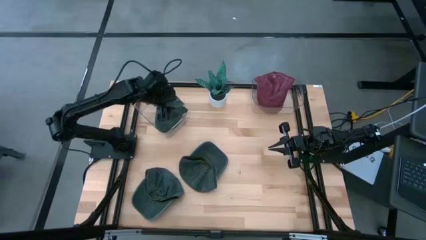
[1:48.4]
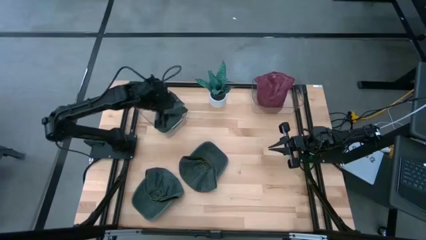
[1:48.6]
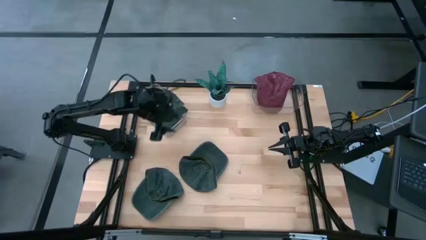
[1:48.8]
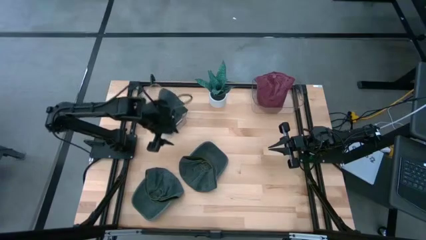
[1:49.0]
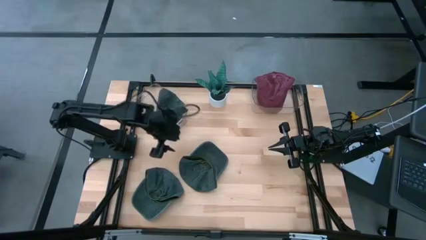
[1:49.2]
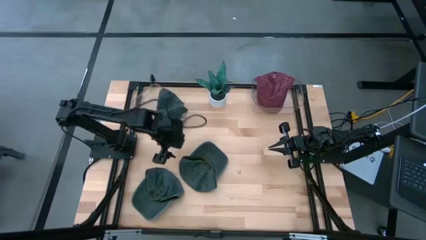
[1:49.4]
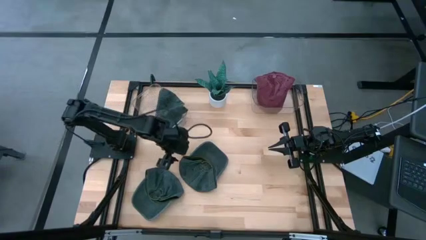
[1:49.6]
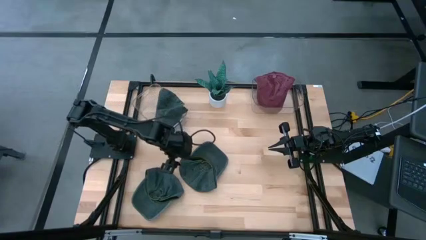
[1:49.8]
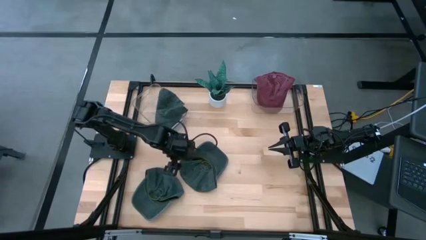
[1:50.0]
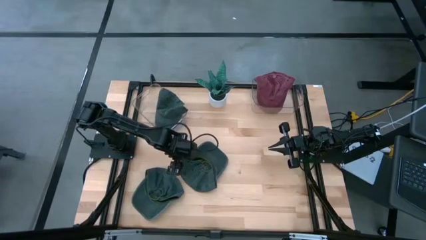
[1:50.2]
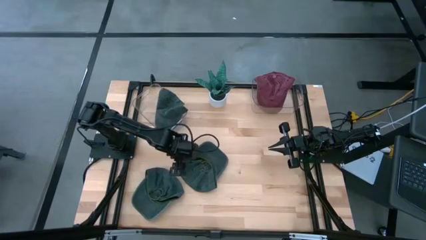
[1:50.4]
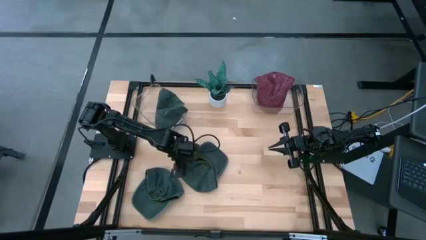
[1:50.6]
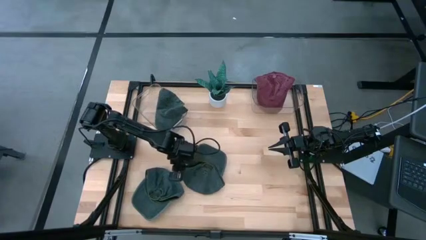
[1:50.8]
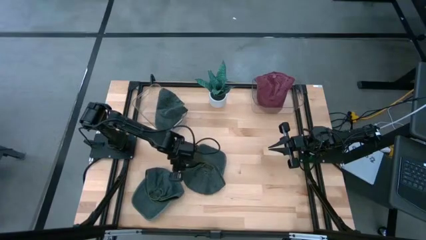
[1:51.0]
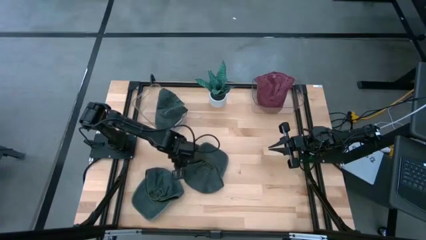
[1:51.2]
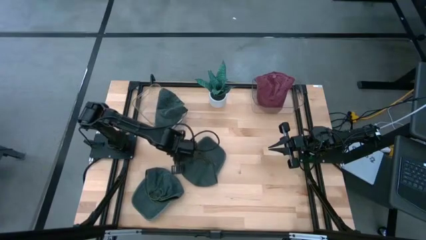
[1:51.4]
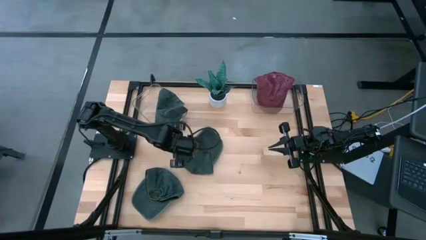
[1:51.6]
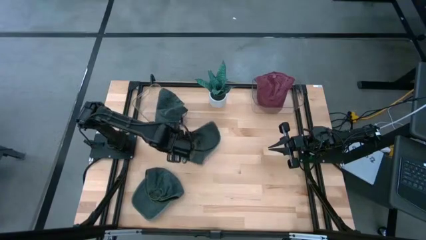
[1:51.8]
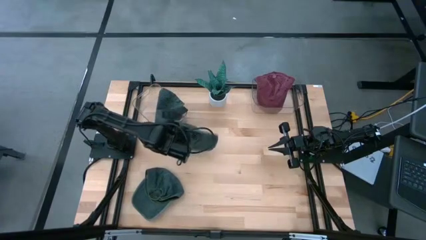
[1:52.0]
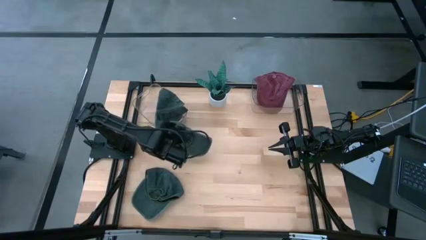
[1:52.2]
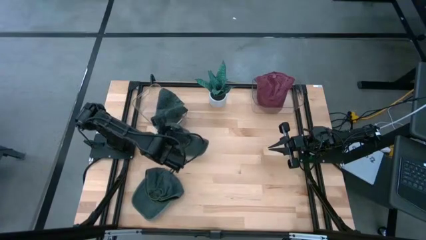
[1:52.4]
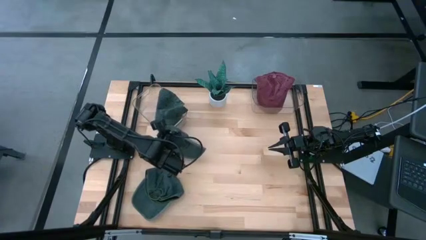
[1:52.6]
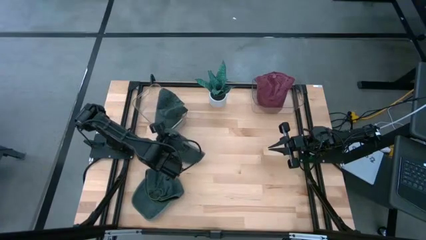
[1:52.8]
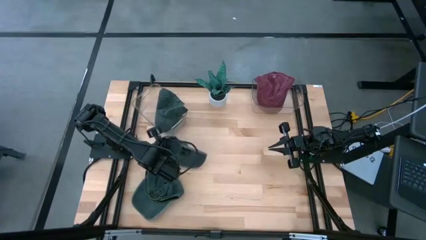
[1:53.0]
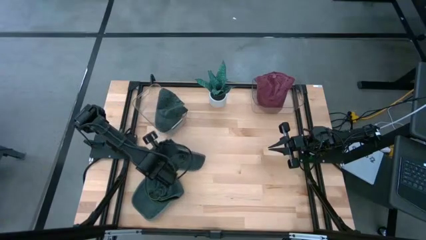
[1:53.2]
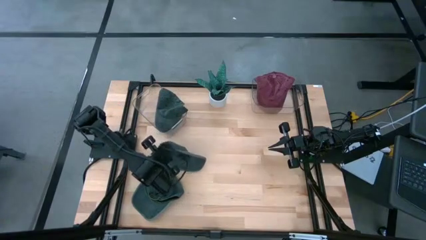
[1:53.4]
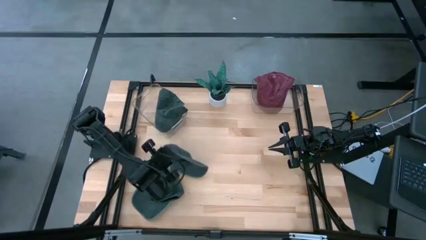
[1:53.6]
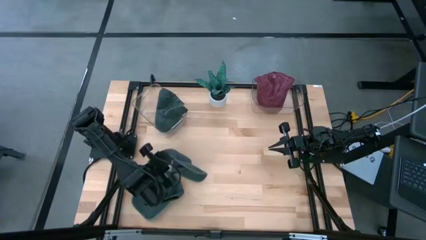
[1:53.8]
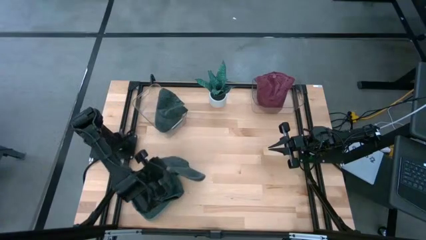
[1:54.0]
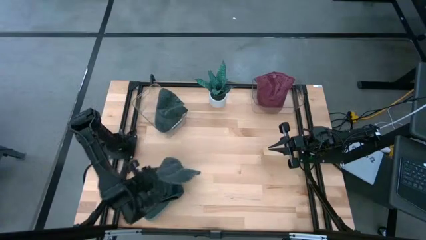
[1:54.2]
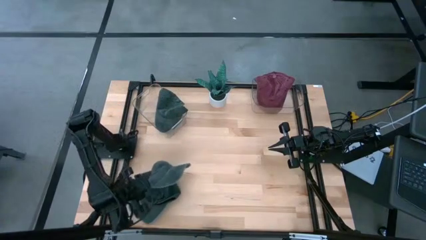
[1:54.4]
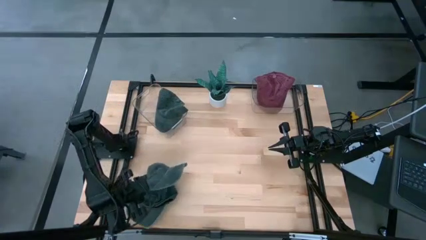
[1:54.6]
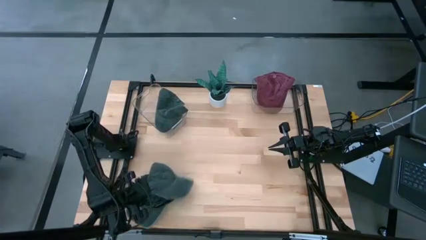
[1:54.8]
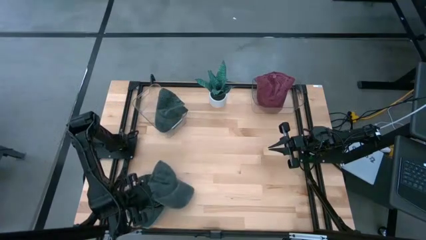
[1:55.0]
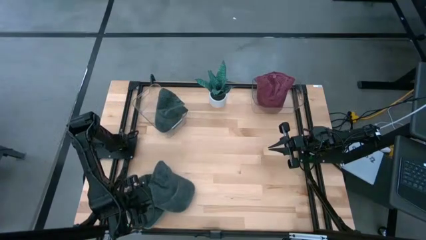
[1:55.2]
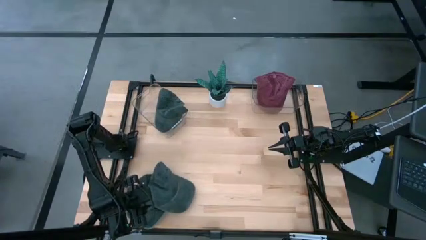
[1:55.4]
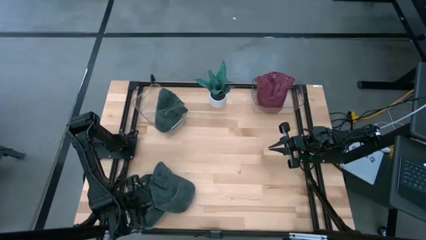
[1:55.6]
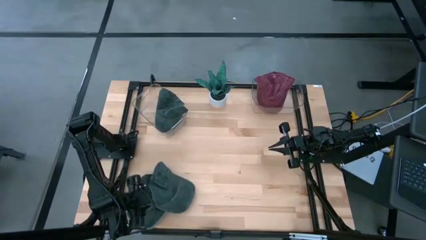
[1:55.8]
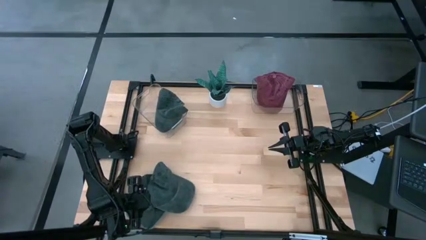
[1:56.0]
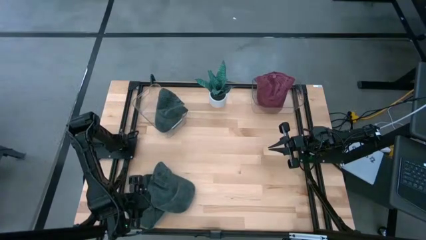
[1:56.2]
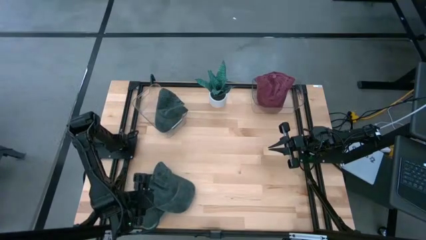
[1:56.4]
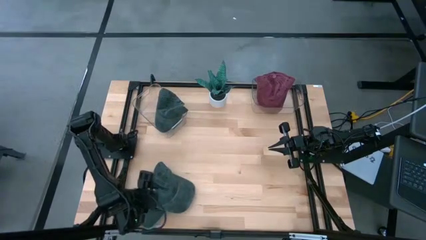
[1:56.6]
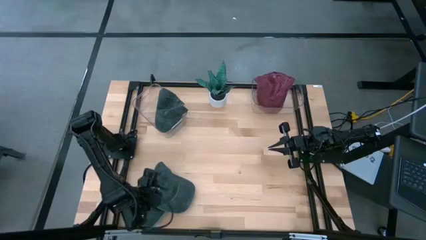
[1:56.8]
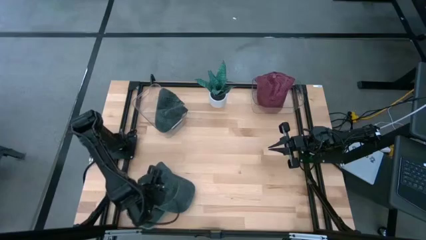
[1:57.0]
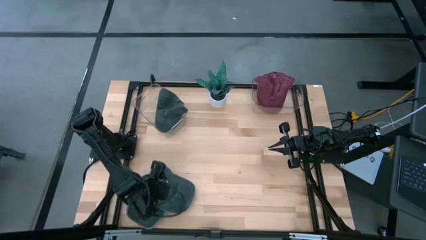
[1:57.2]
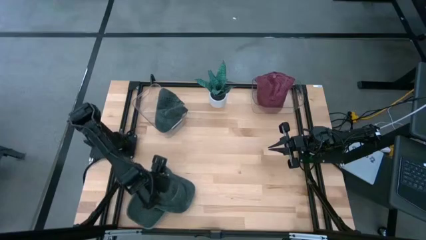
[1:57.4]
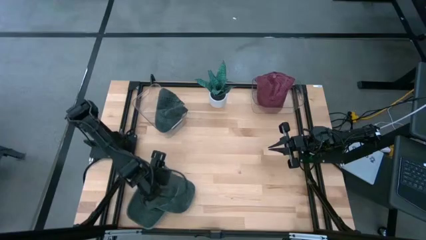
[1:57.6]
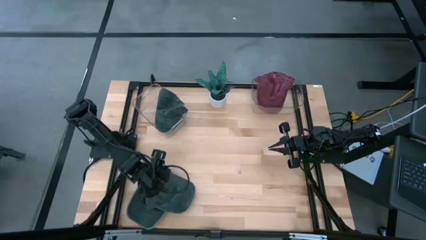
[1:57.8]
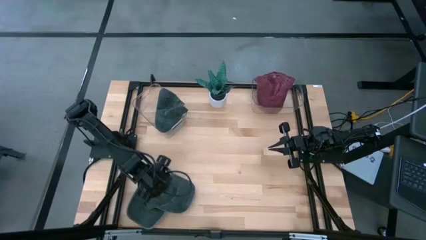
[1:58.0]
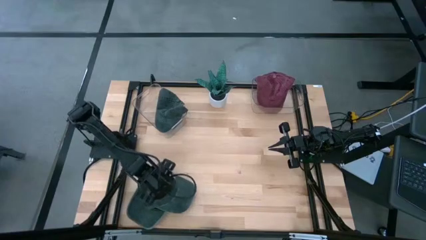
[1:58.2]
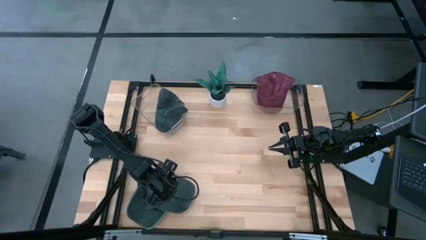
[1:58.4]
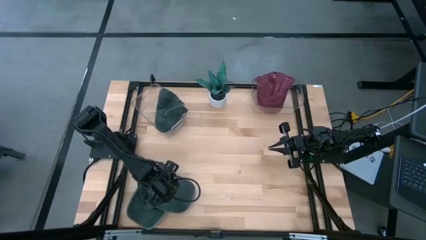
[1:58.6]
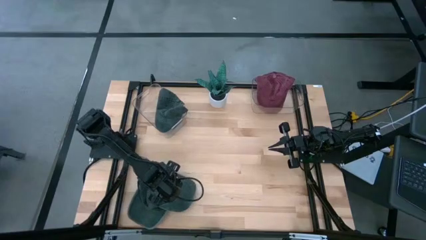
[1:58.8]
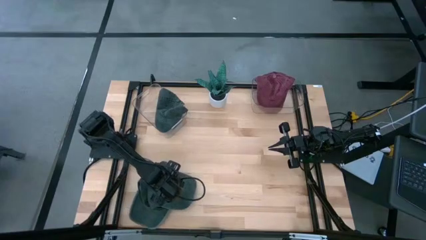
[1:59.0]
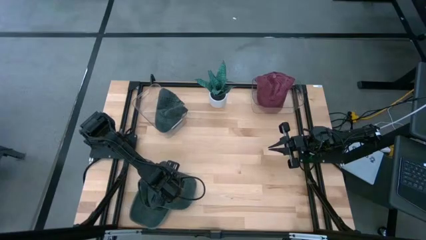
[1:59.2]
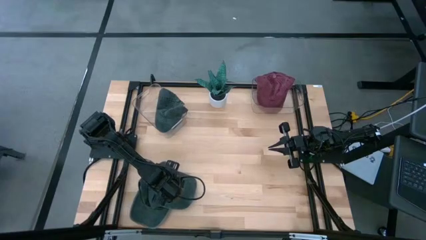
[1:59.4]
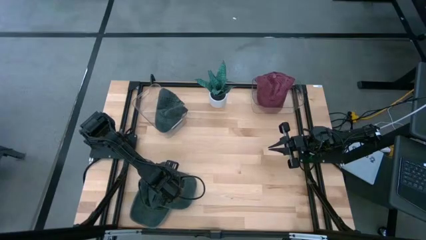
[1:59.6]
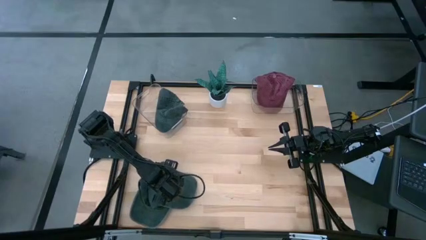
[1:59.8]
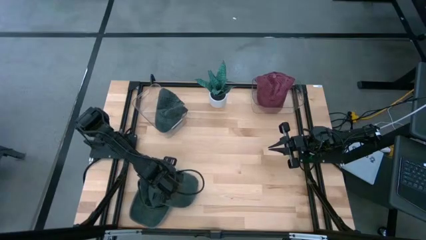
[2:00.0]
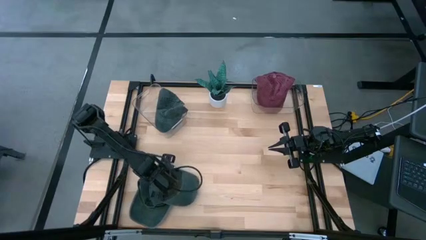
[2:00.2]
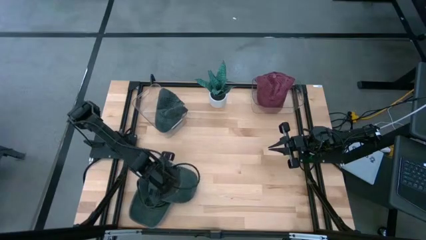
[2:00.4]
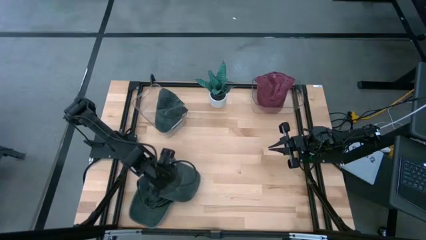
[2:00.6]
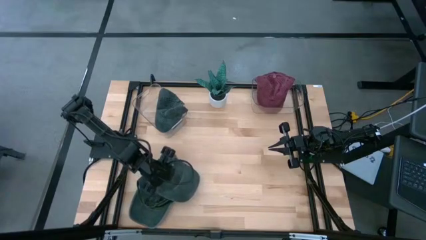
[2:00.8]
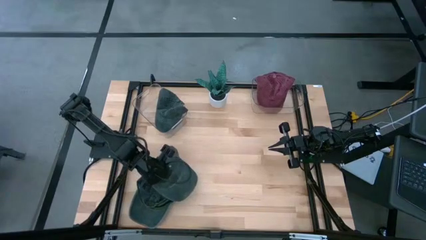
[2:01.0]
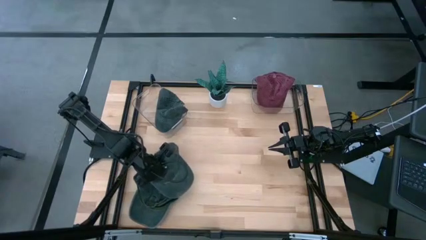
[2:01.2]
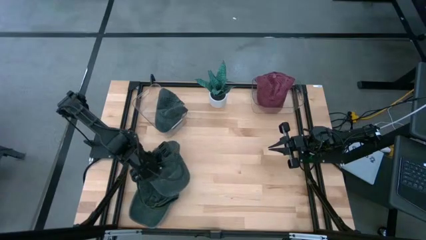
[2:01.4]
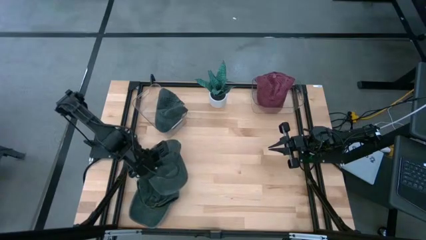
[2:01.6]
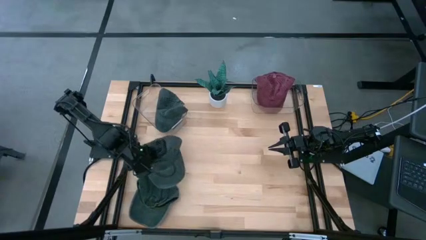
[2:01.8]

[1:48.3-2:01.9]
Task: Pick & Place hat
Put the right black cap into the left transparent bin
